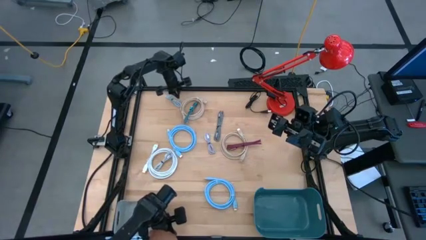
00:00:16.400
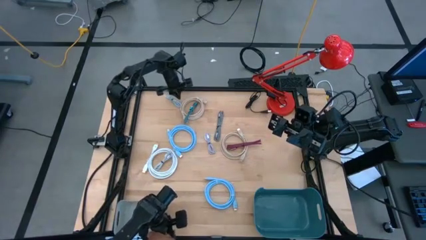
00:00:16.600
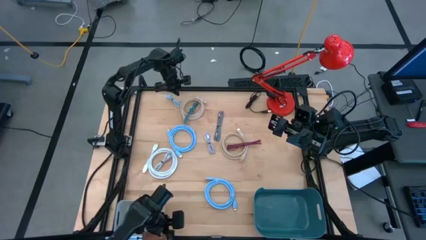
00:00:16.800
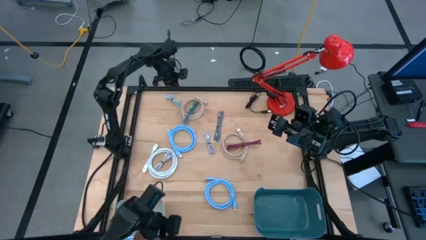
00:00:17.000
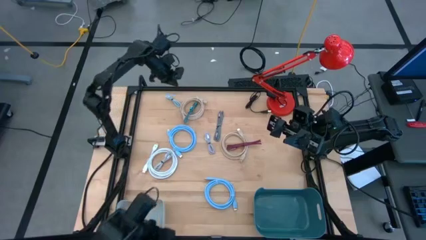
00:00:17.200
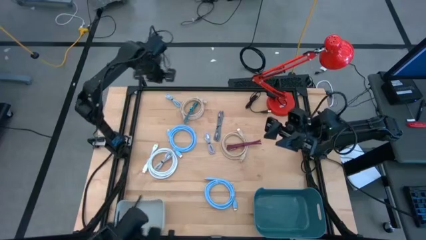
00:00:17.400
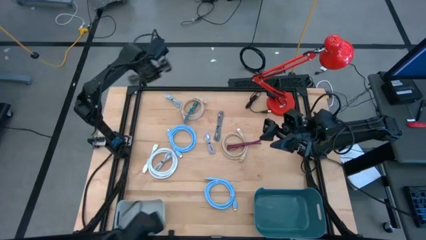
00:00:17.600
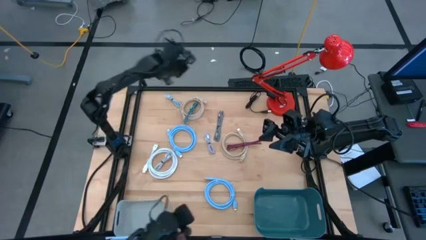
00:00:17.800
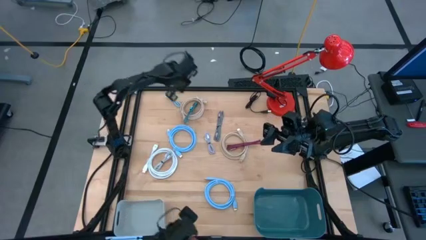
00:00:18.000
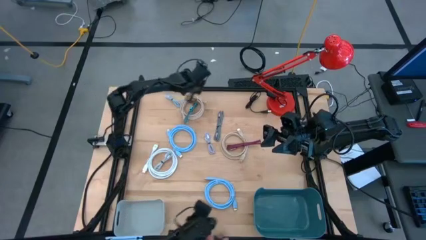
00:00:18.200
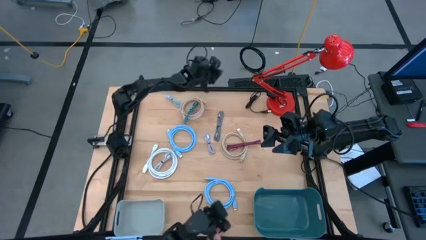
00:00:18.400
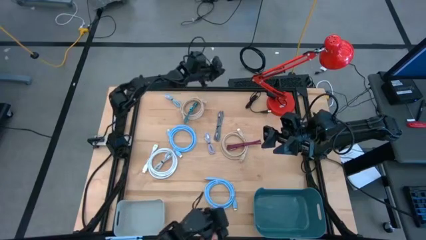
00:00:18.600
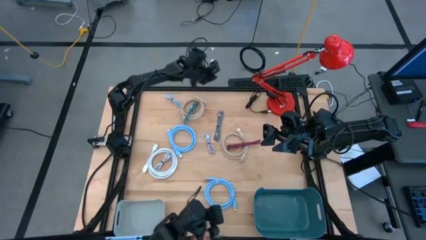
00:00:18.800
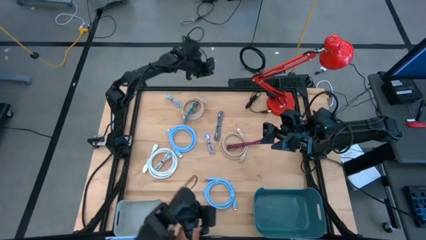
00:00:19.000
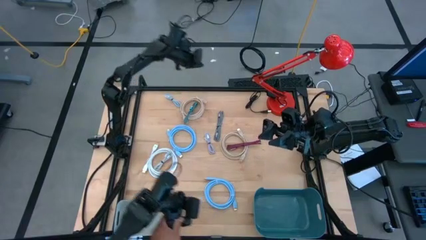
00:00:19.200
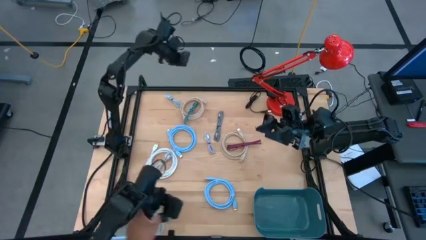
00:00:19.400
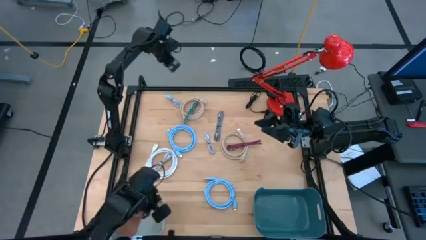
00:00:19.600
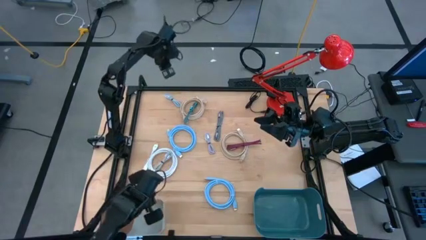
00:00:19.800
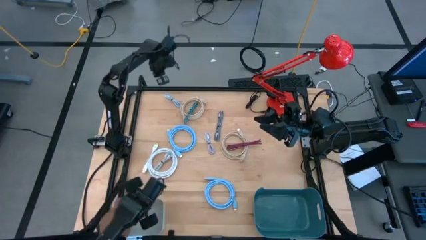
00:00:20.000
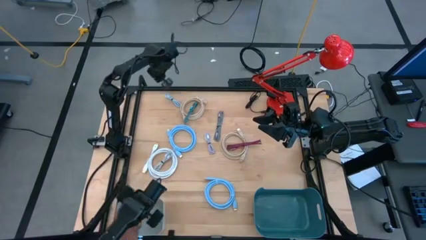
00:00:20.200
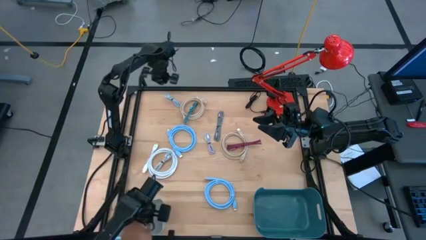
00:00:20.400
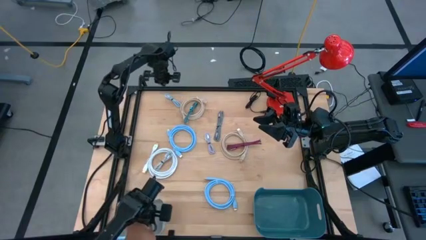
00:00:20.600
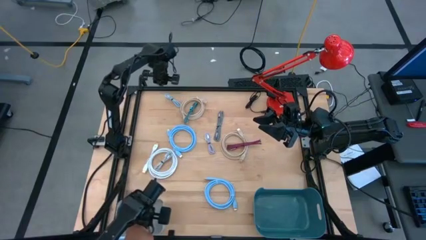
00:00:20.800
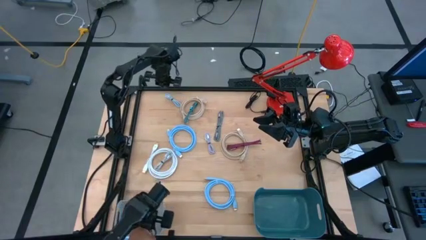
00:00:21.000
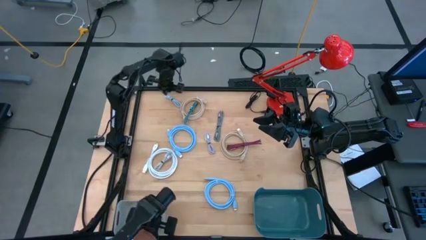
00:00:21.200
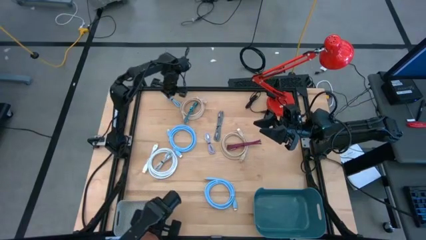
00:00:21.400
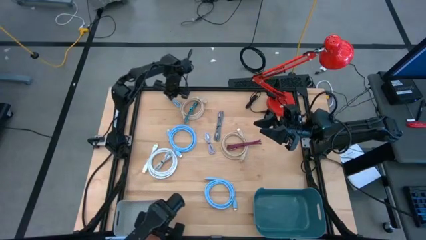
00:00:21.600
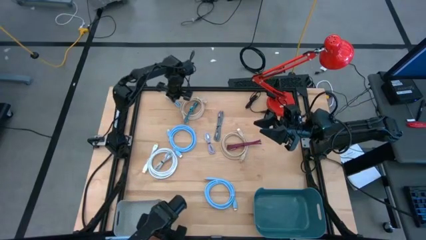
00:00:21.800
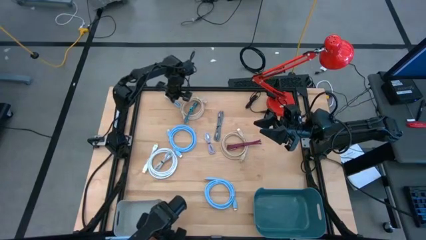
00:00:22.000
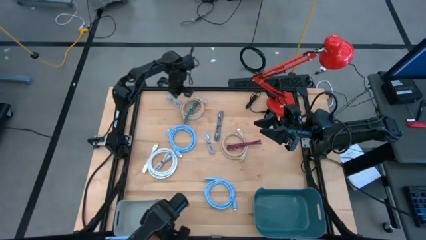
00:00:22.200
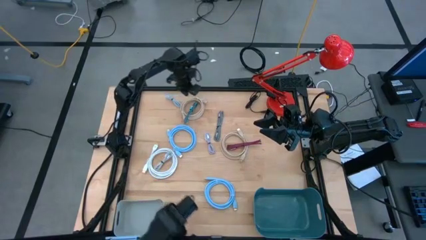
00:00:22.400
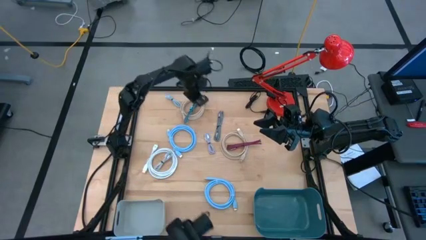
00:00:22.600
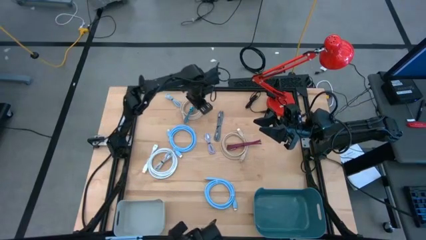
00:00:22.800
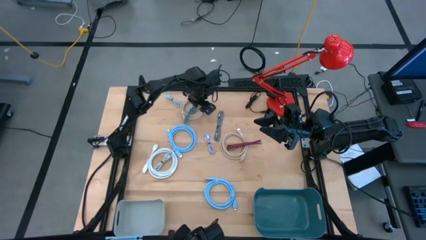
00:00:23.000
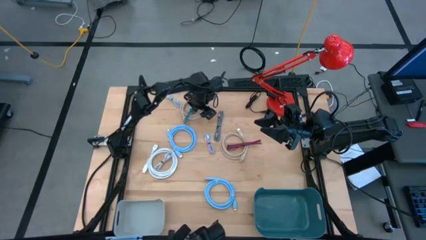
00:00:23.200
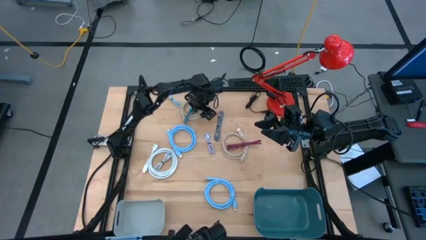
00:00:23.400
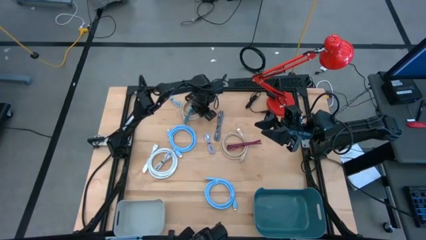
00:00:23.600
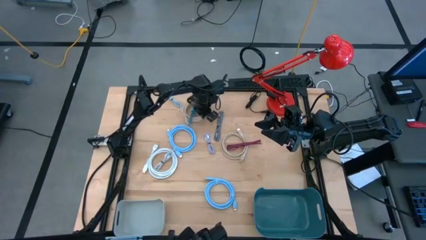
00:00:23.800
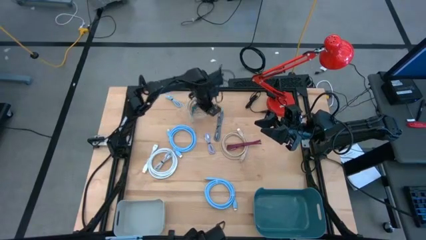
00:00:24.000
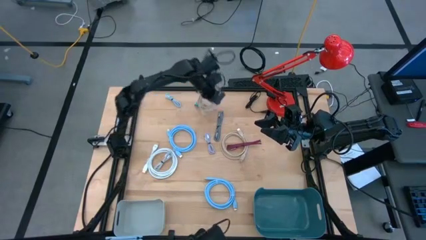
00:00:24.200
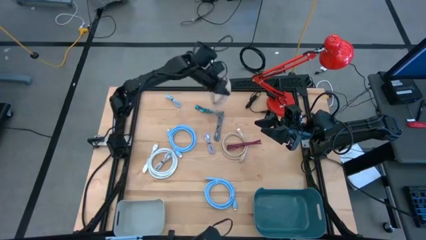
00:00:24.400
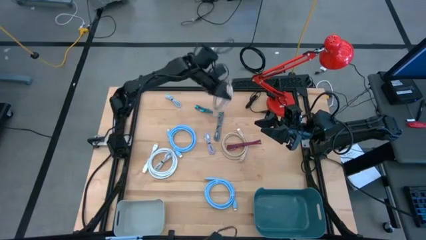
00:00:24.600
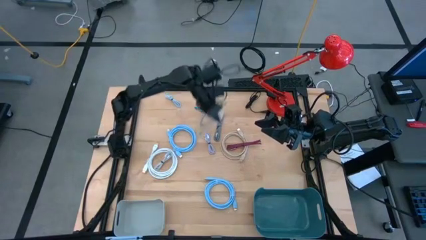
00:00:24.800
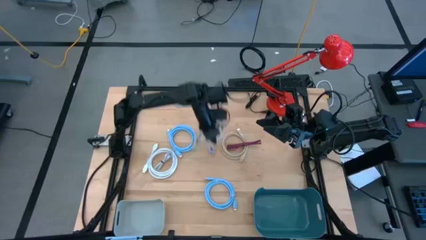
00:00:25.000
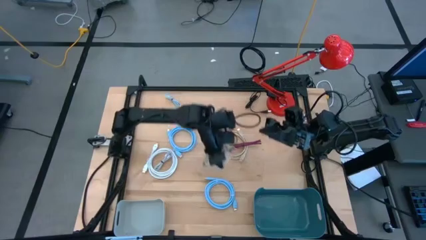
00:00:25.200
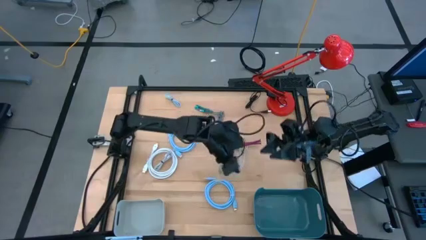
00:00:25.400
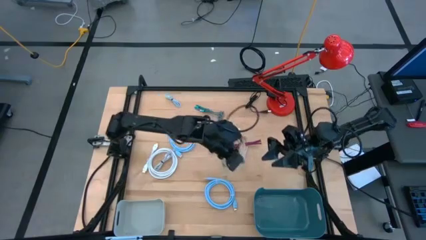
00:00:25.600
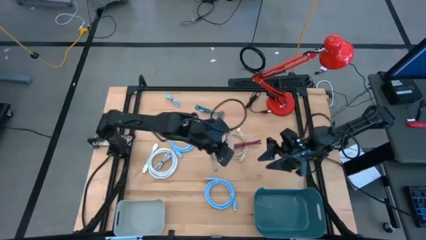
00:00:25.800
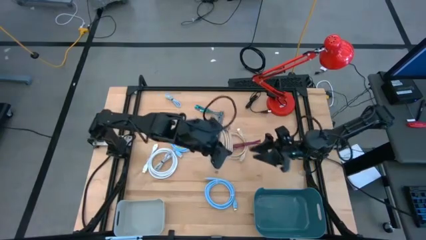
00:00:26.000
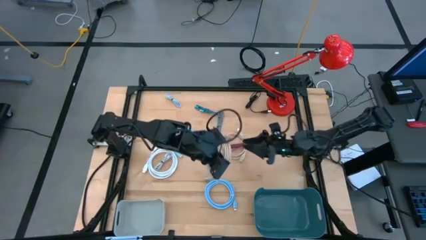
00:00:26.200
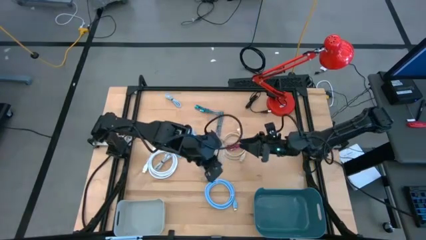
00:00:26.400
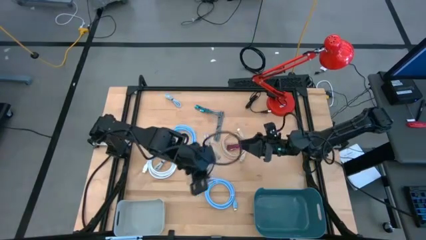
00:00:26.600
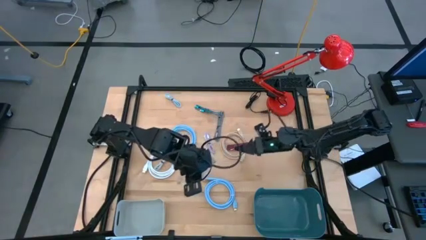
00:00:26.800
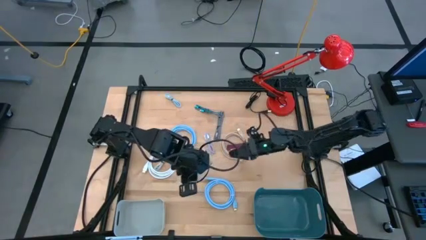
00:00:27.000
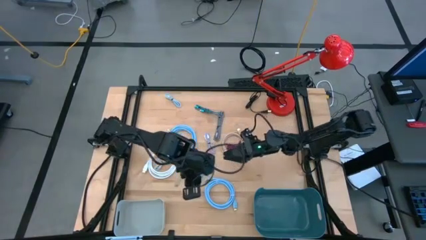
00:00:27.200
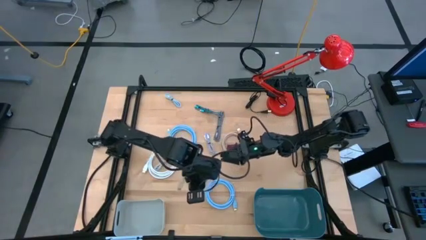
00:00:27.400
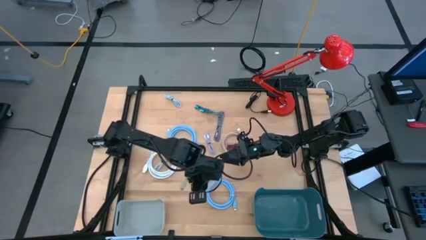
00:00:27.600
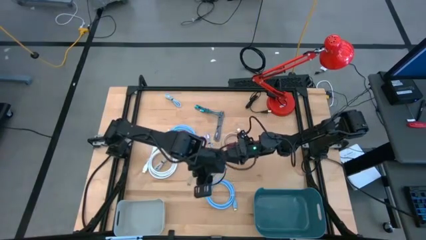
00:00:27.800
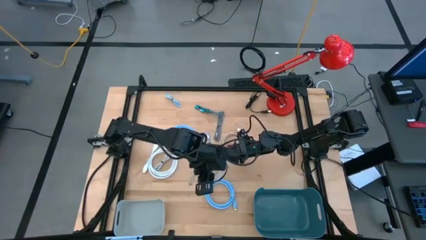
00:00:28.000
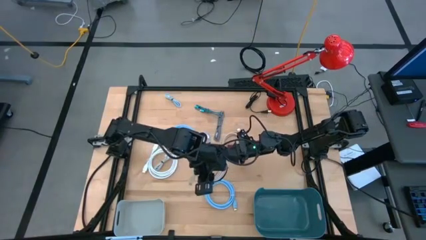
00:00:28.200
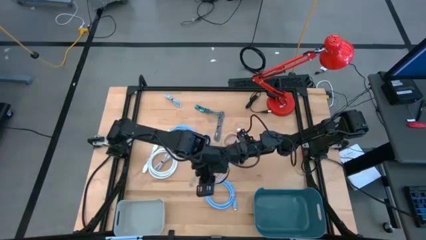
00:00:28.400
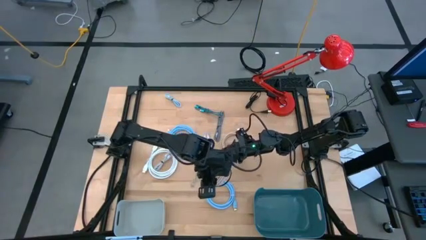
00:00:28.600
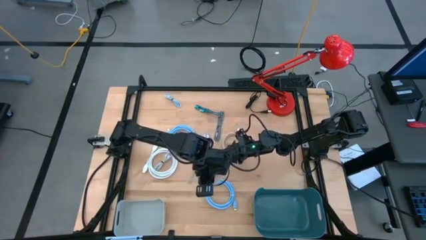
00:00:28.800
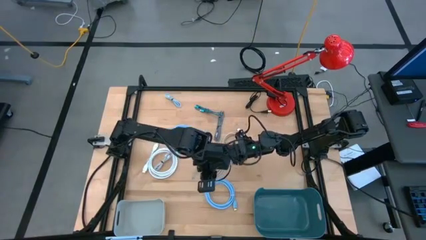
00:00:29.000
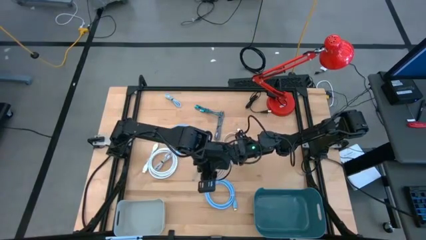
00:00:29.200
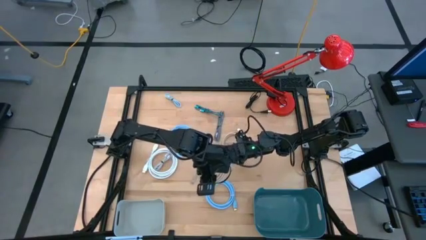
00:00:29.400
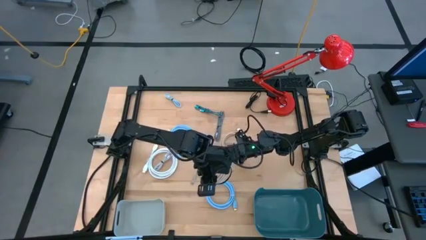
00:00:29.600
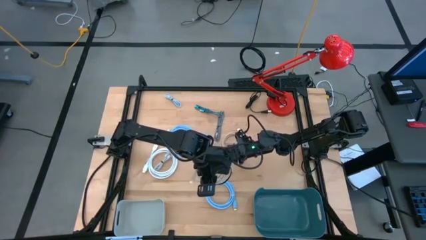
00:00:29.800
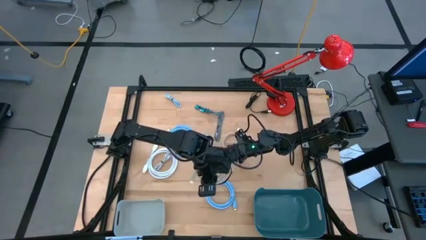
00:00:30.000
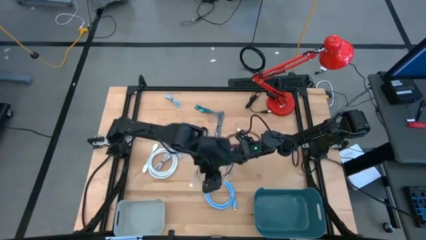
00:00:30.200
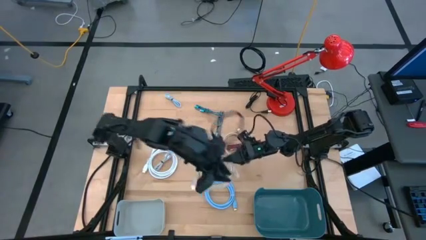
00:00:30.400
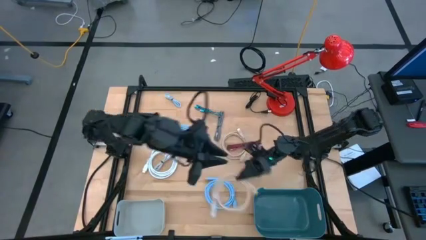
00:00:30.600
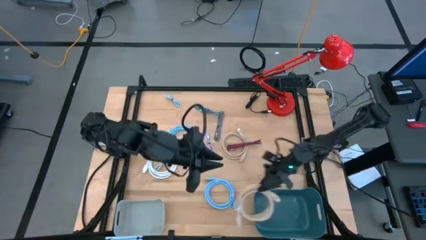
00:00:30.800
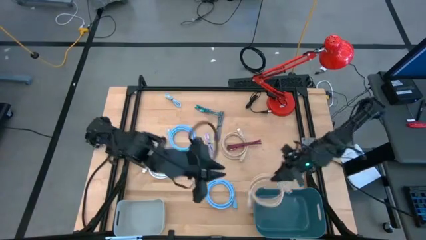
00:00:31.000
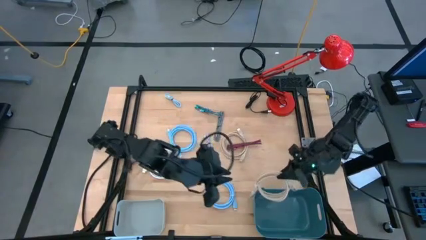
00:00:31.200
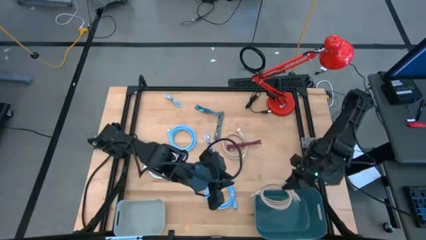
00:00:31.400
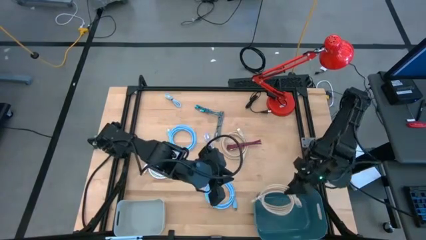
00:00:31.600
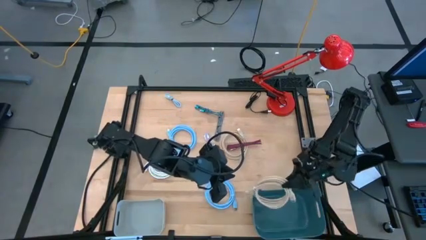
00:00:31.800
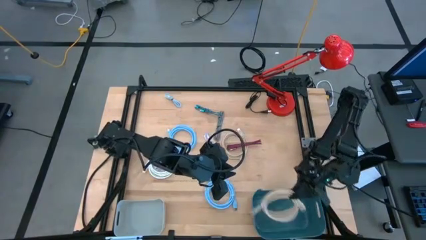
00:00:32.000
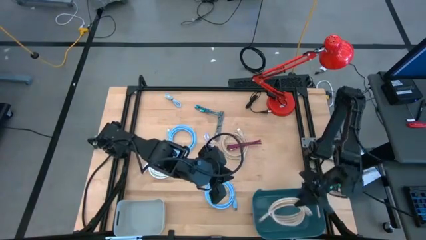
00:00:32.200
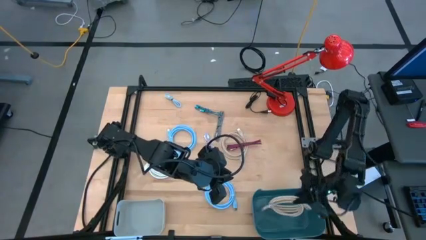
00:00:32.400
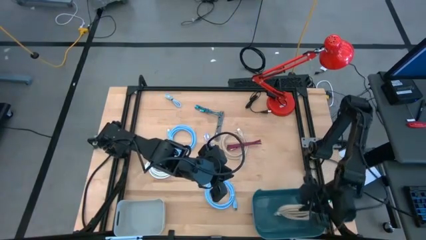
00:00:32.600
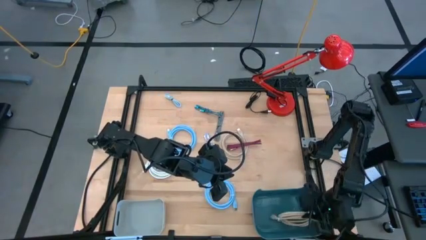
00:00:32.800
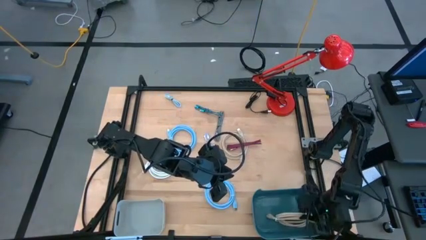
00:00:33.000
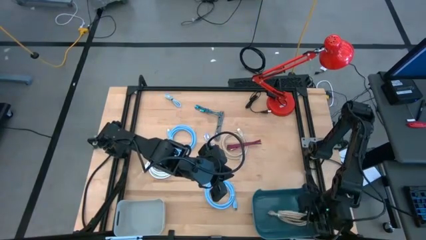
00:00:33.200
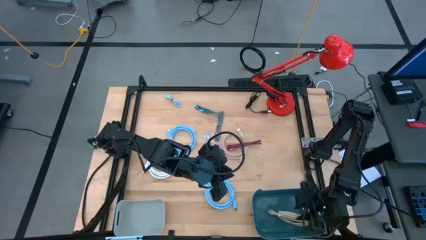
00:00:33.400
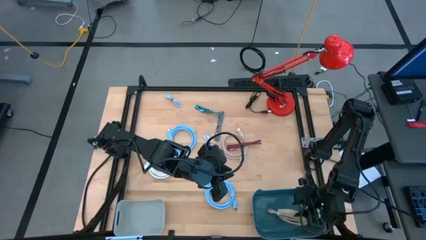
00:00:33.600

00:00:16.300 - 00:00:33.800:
Task: Pick & Place USB Port
Put the top brown display cable into the blue bin
